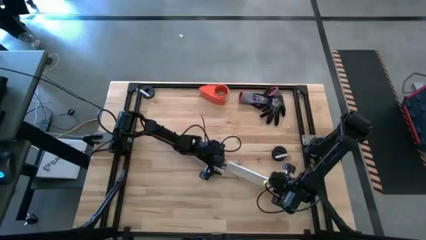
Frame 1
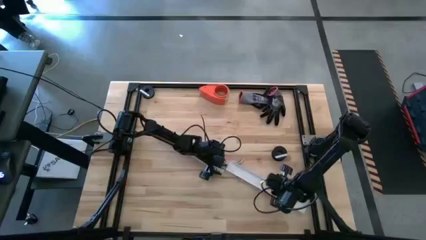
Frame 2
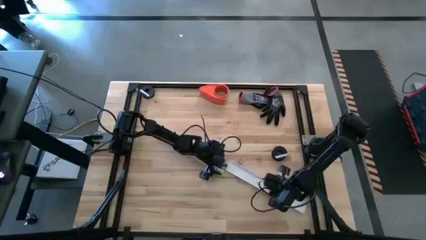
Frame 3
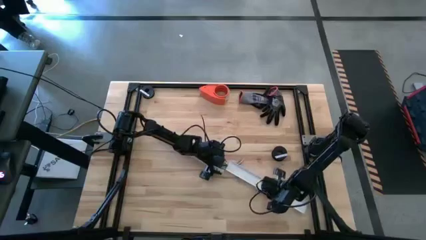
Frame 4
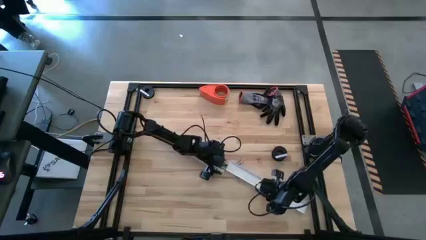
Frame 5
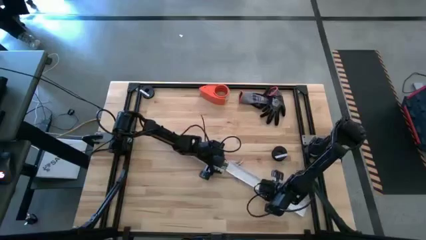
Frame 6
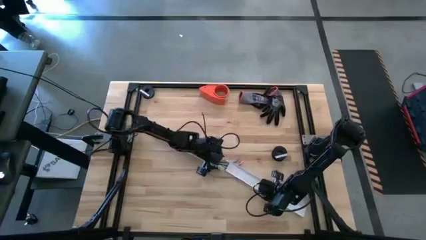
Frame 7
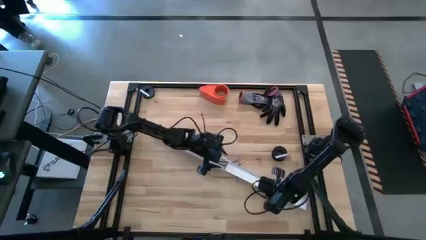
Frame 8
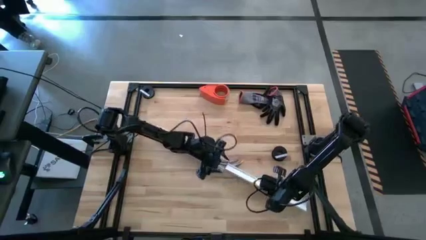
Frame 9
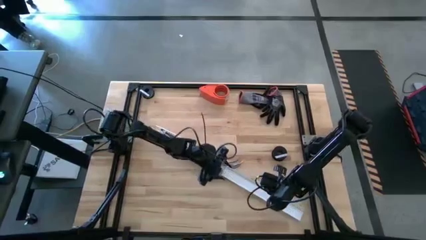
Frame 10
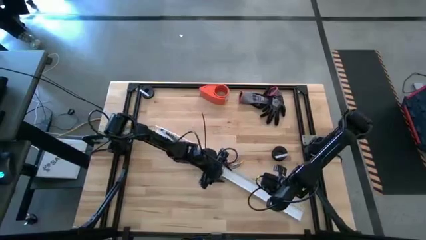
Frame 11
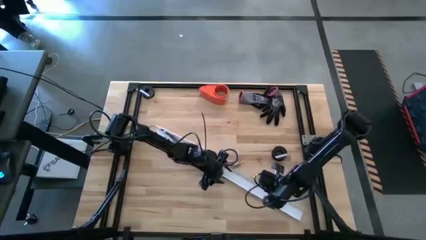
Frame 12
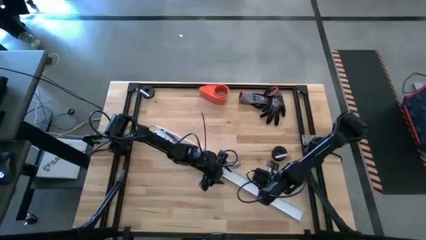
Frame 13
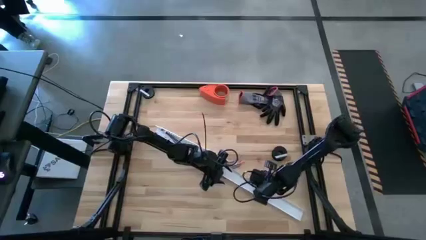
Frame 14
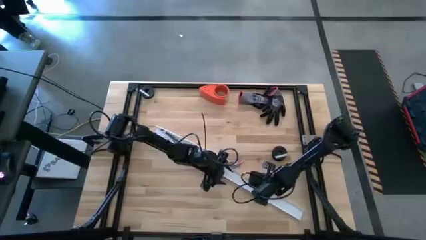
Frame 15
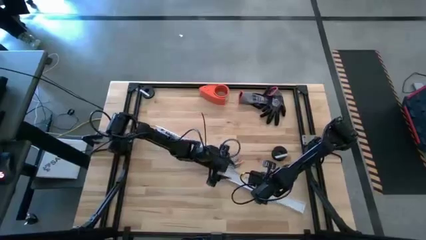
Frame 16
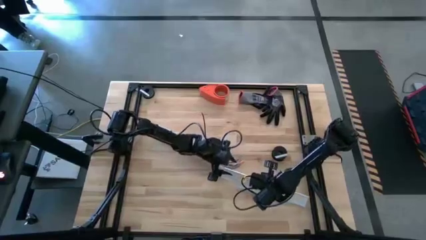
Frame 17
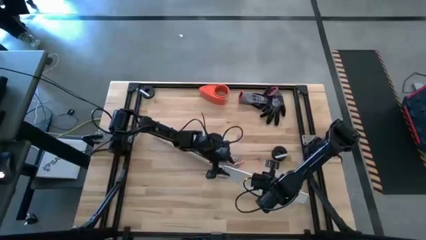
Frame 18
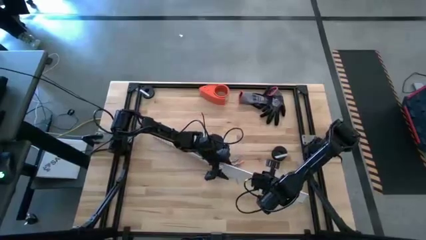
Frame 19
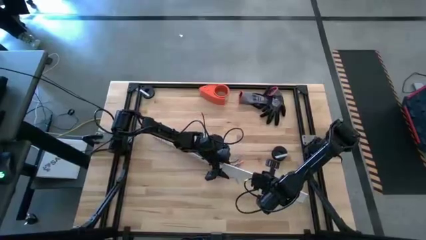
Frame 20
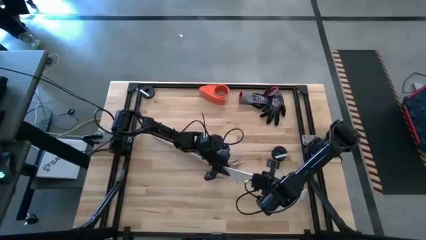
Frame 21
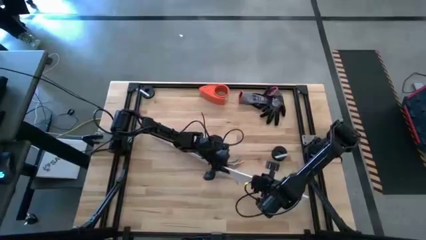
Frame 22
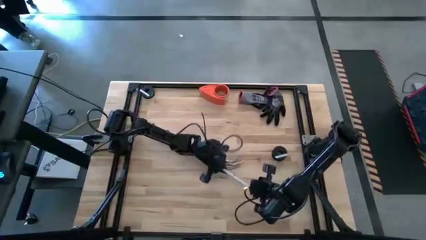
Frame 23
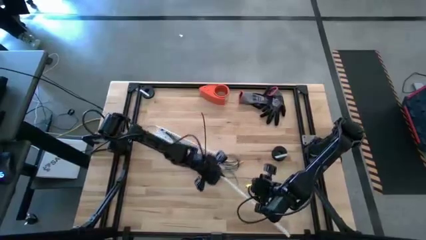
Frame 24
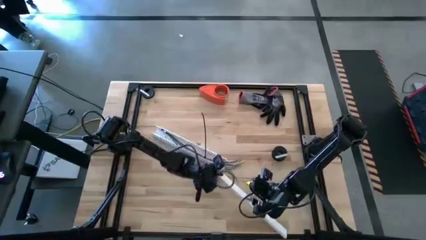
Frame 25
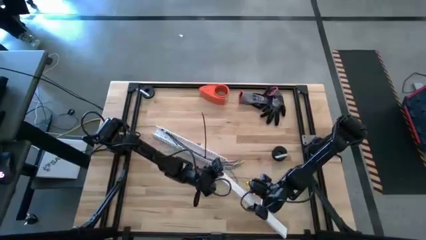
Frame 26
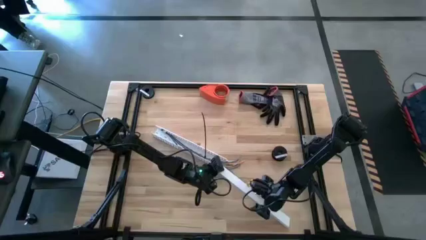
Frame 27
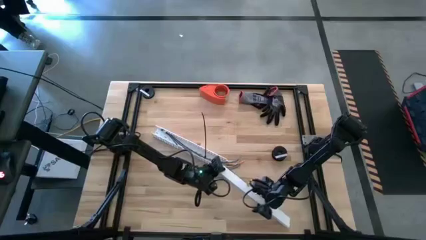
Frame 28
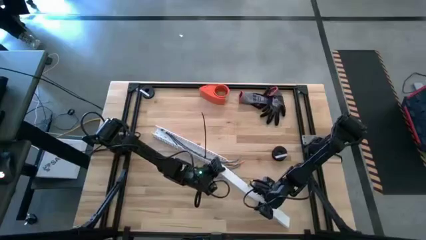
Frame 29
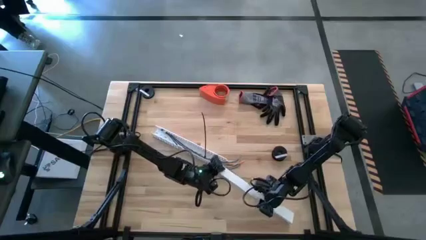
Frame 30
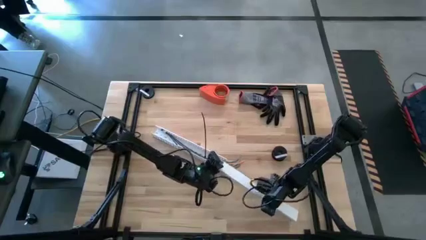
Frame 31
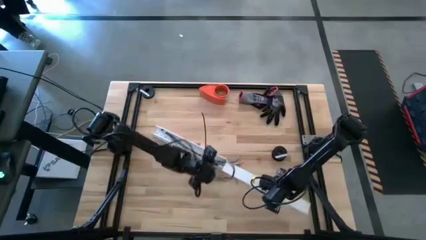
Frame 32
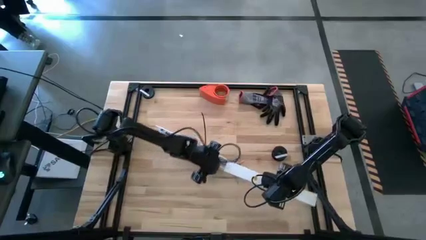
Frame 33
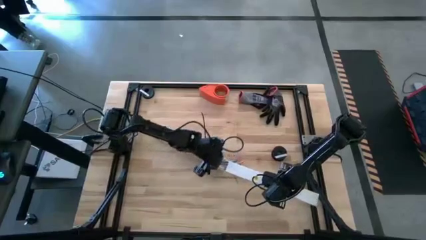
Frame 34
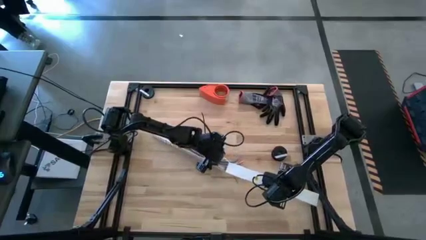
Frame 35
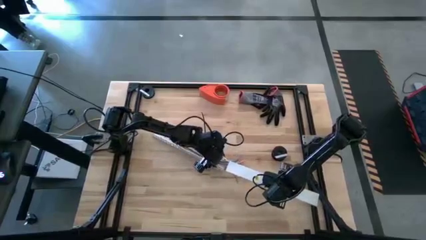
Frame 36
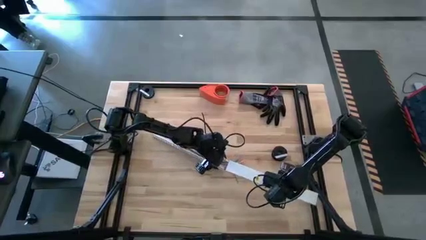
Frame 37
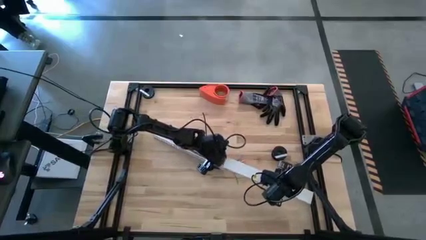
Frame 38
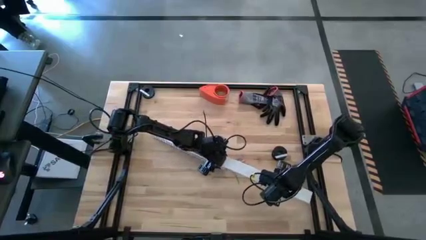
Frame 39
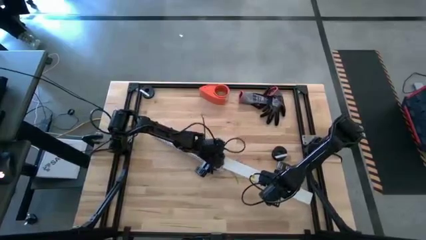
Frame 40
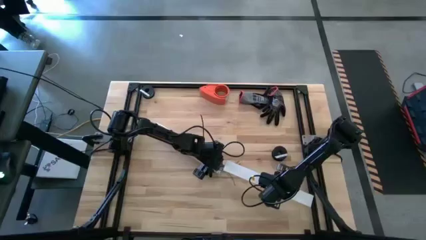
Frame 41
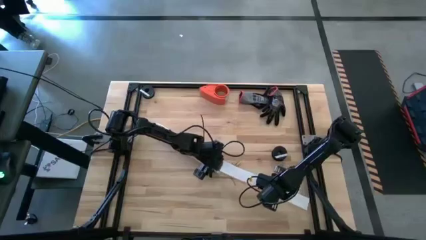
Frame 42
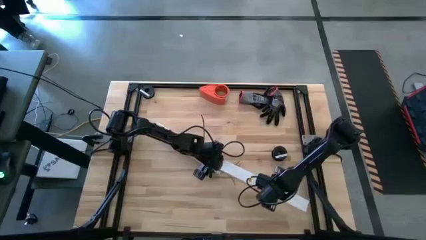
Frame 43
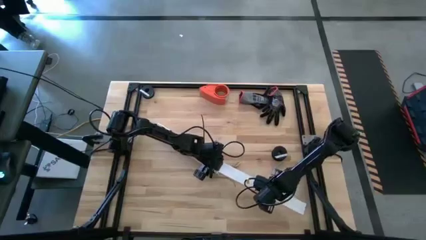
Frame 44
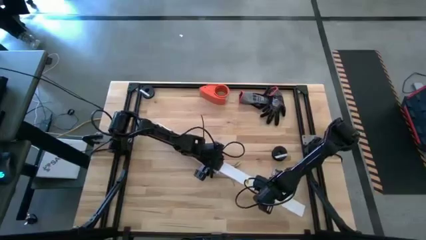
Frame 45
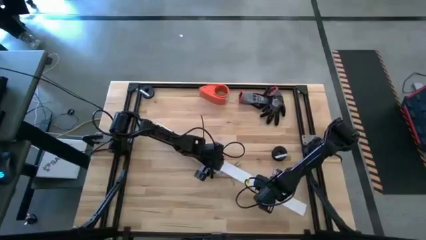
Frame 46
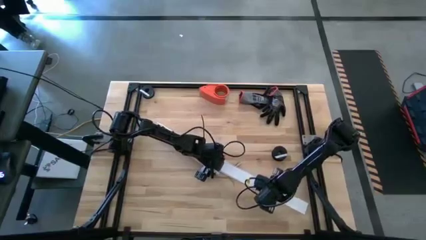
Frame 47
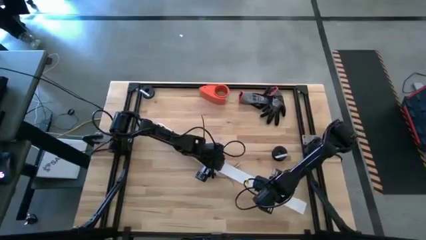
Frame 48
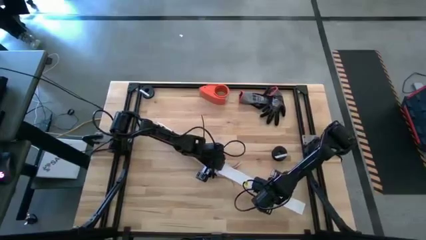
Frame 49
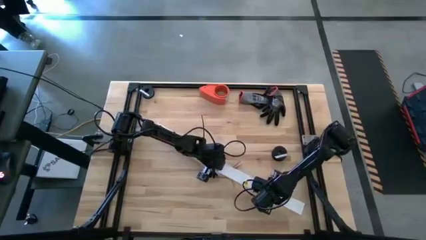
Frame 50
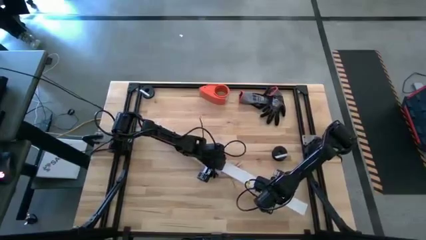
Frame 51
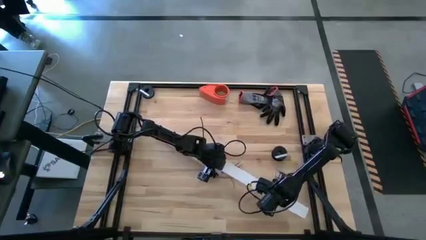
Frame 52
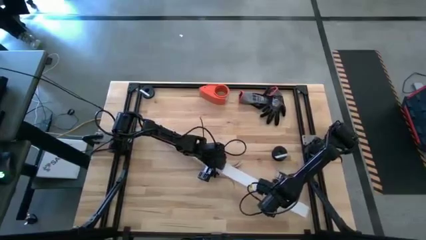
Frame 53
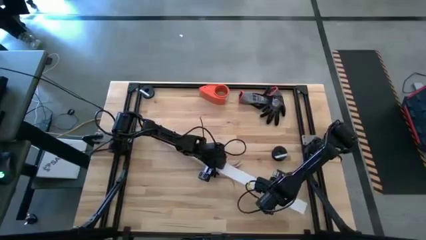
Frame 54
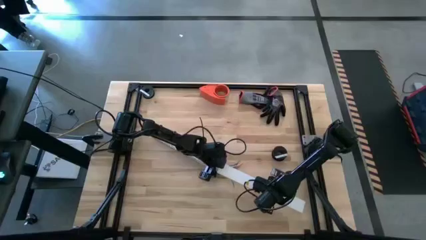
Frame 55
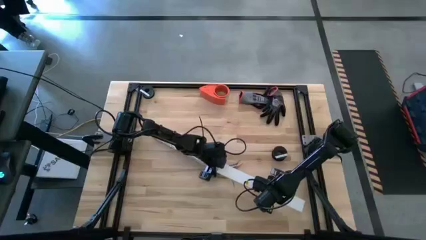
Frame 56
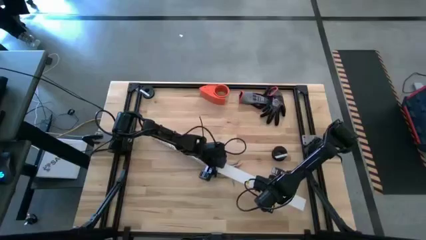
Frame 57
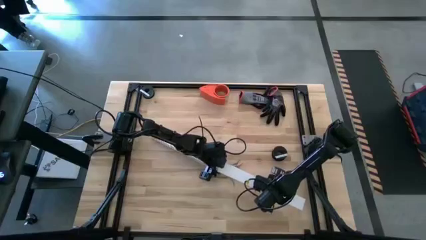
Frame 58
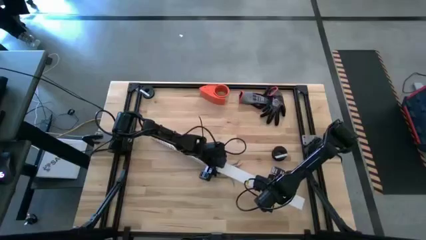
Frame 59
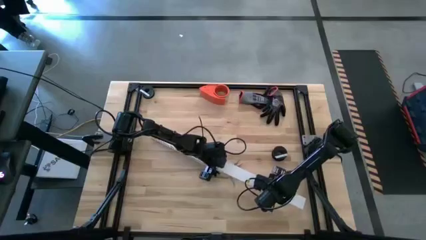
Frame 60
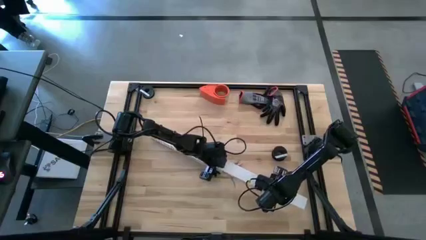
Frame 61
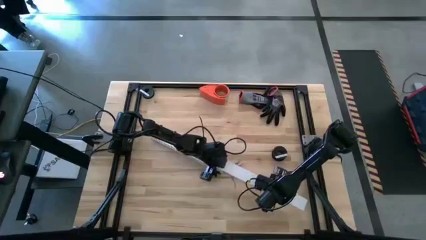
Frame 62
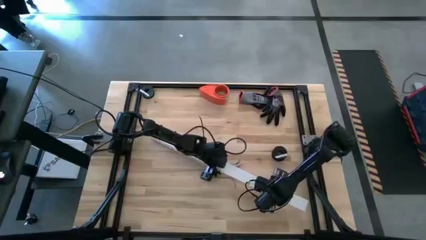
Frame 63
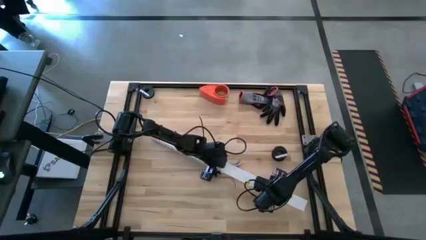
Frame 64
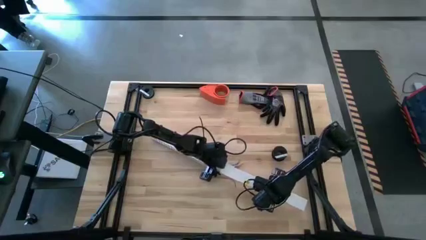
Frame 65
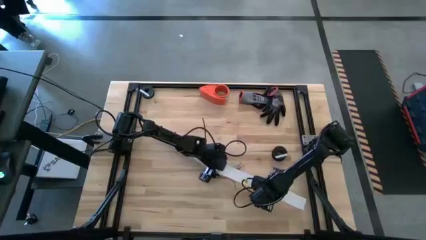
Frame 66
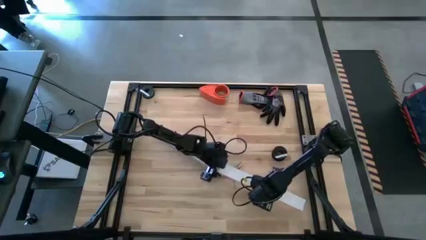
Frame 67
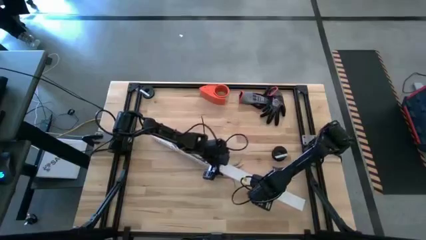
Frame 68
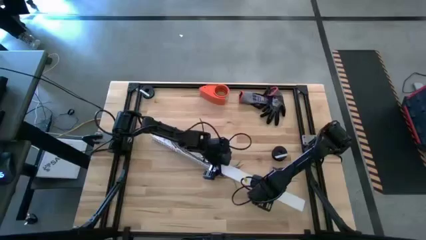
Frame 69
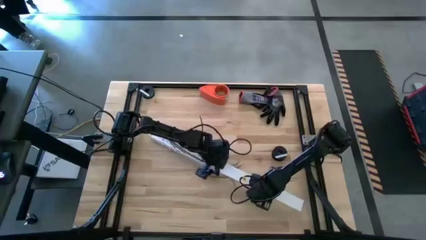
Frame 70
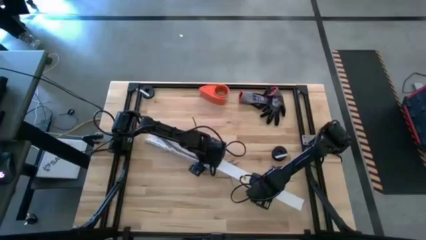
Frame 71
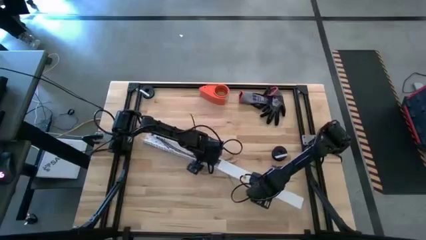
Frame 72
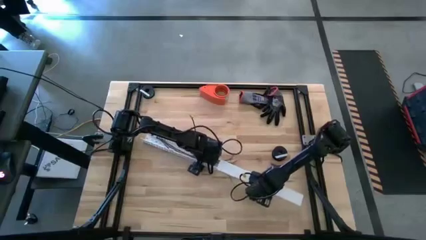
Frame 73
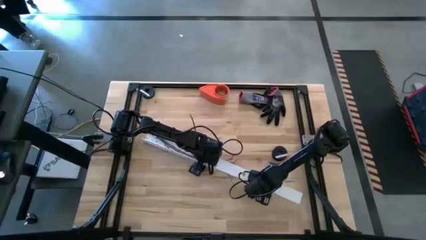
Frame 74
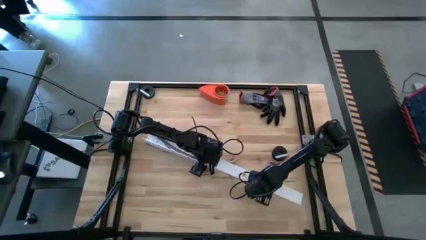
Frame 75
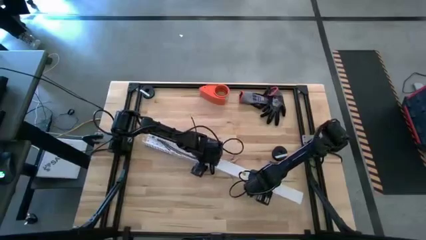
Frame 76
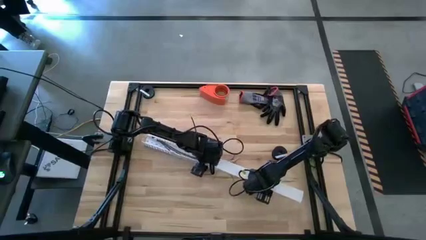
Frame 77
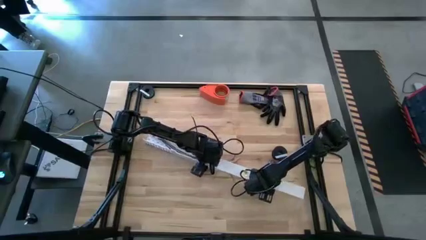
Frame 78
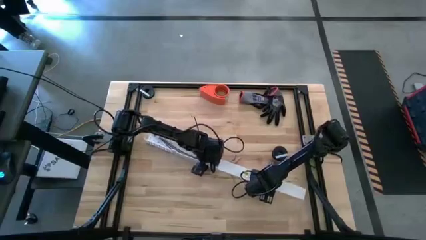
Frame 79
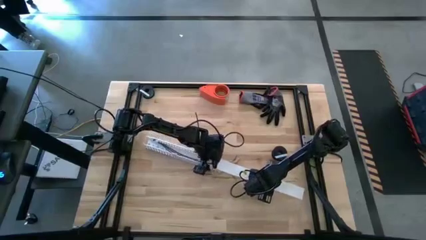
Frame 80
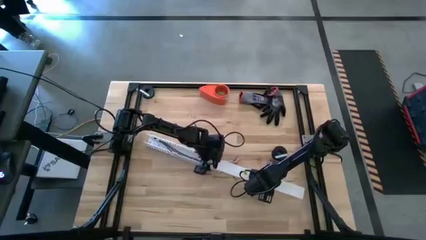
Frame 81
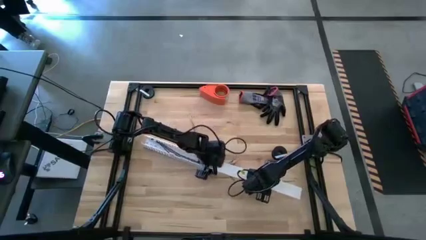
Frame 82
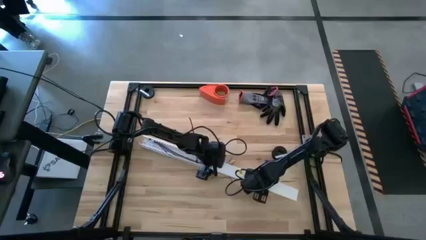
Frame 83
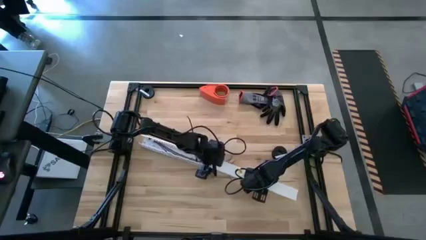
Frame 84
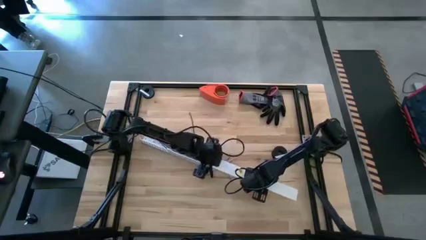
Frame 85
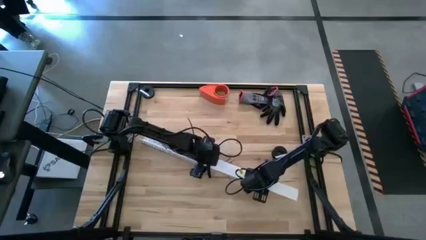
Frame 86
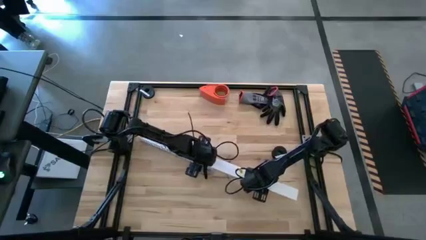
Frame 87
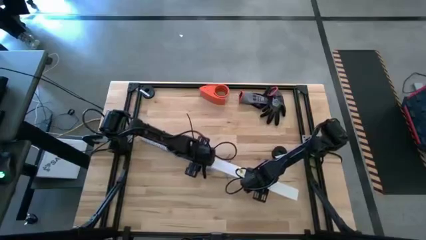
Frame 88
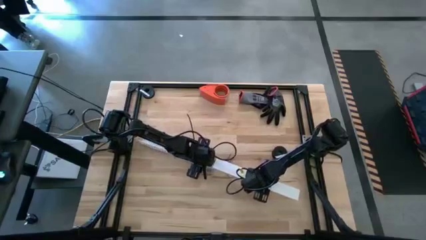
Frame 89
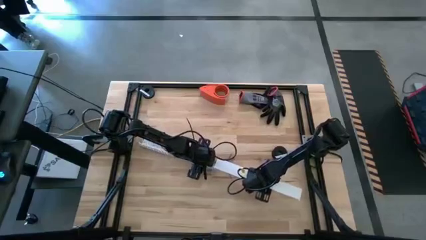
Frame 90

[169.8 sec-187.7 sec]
Task: Ziptie cables
Close the white cable duct
